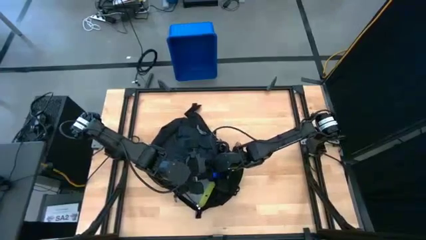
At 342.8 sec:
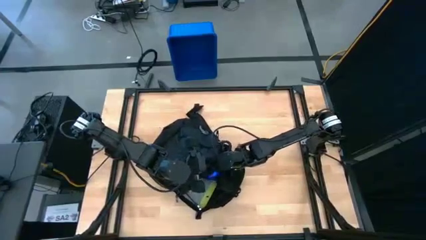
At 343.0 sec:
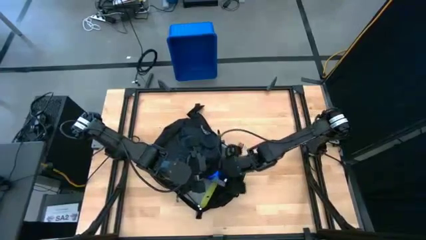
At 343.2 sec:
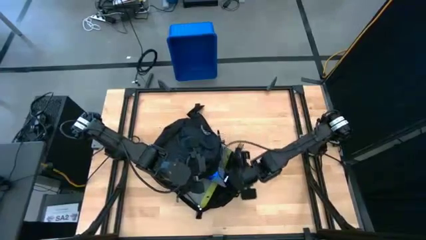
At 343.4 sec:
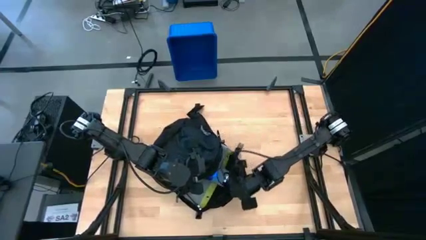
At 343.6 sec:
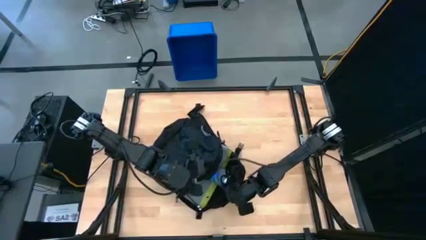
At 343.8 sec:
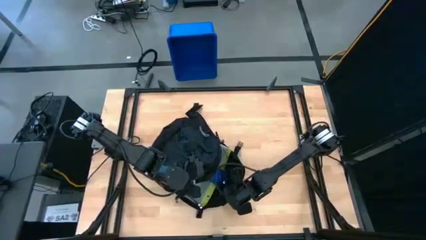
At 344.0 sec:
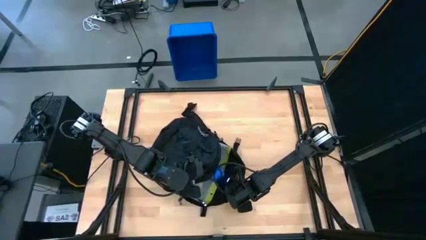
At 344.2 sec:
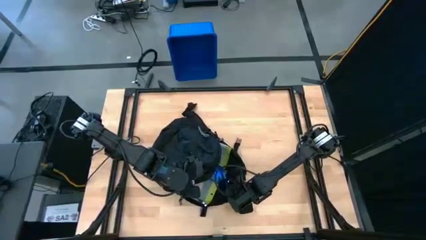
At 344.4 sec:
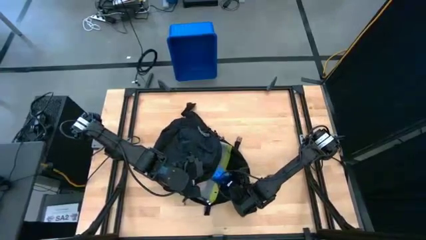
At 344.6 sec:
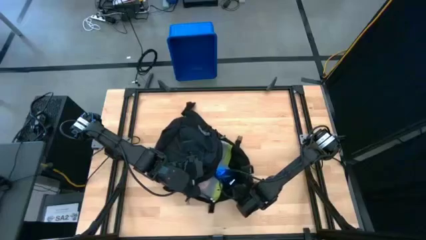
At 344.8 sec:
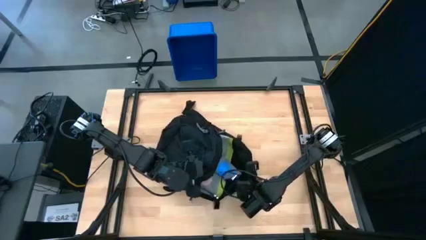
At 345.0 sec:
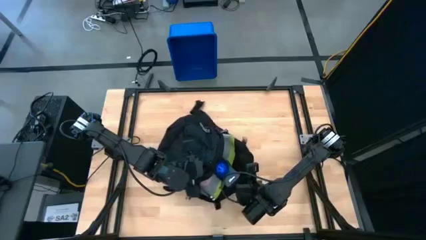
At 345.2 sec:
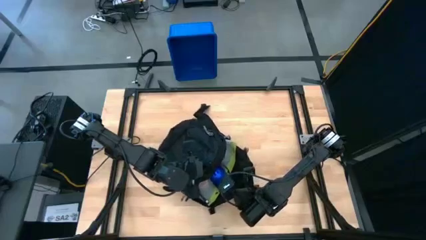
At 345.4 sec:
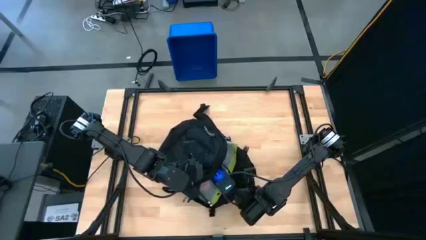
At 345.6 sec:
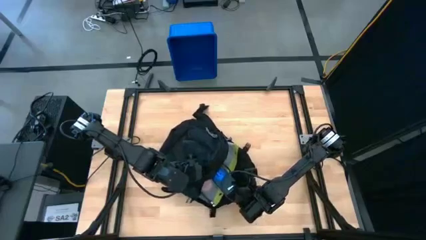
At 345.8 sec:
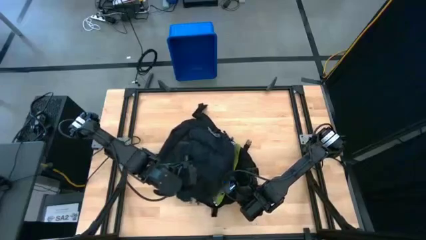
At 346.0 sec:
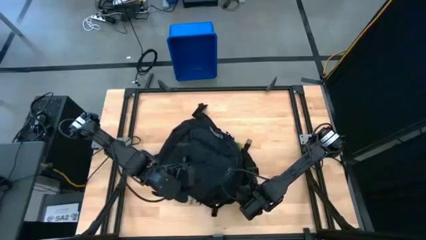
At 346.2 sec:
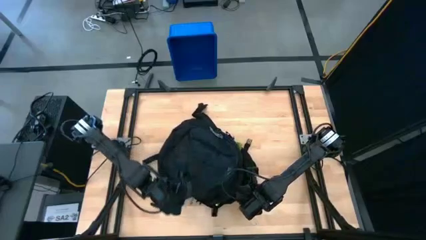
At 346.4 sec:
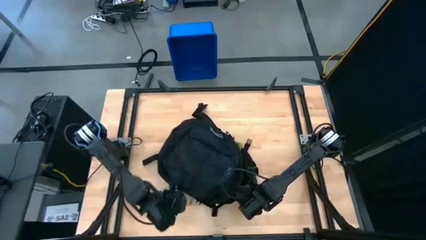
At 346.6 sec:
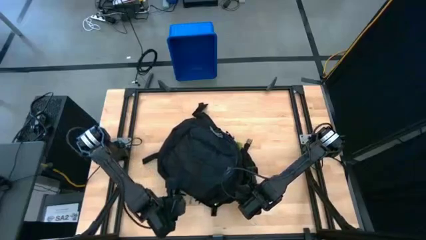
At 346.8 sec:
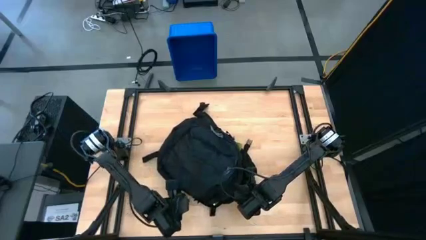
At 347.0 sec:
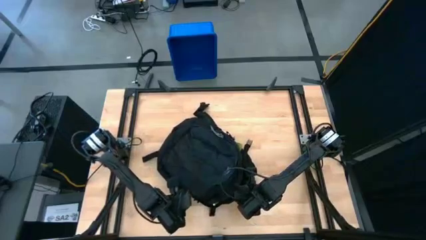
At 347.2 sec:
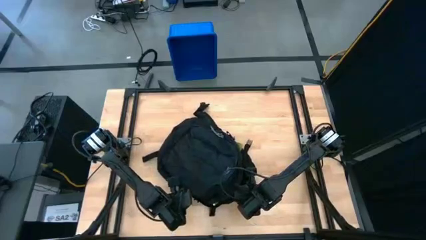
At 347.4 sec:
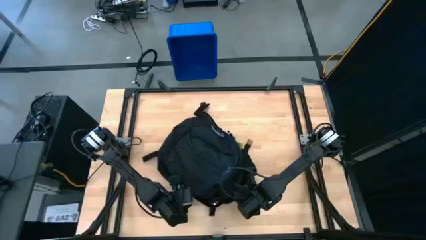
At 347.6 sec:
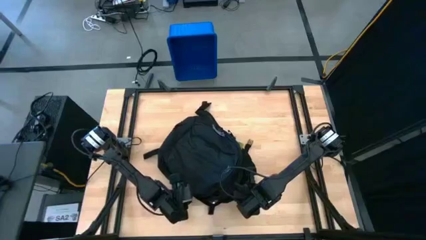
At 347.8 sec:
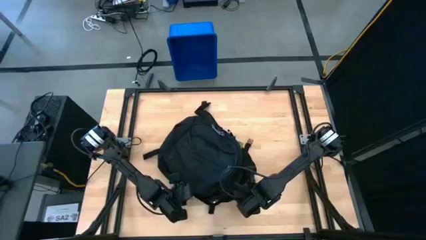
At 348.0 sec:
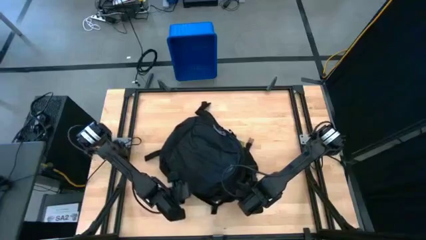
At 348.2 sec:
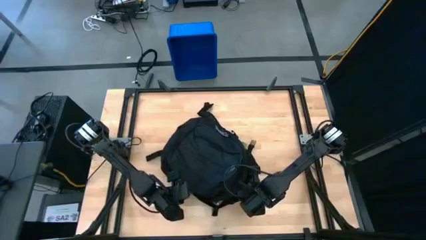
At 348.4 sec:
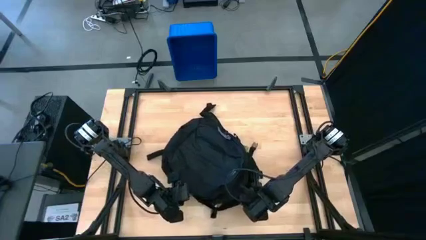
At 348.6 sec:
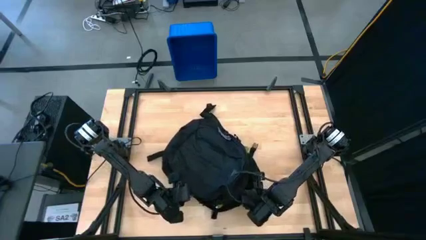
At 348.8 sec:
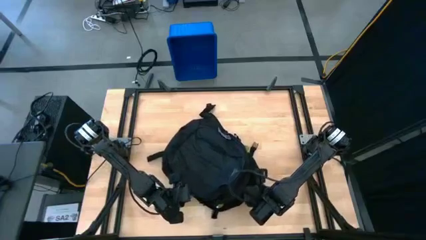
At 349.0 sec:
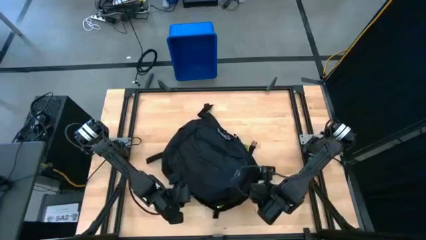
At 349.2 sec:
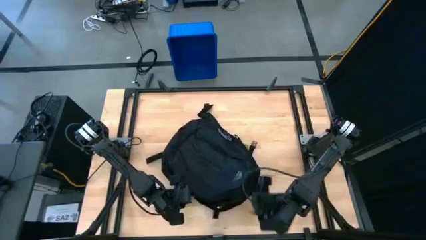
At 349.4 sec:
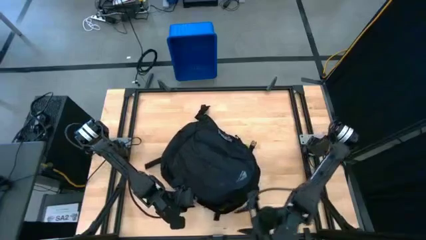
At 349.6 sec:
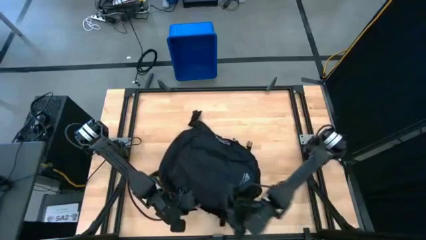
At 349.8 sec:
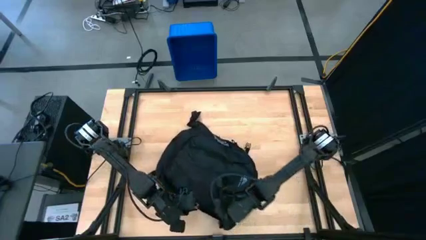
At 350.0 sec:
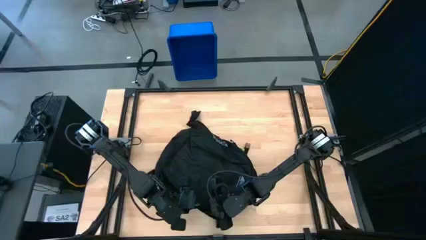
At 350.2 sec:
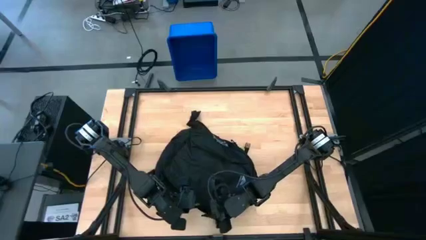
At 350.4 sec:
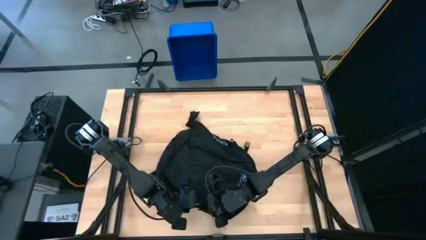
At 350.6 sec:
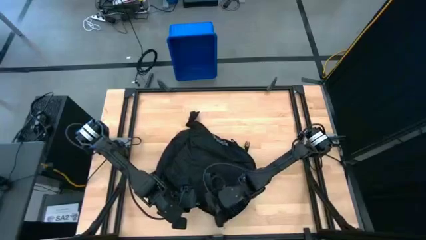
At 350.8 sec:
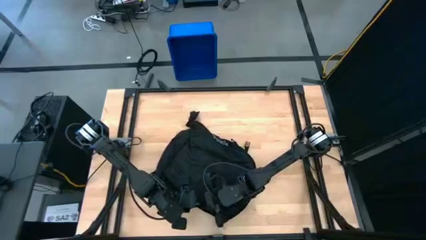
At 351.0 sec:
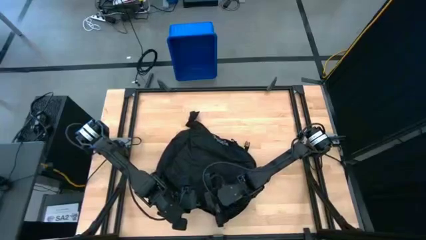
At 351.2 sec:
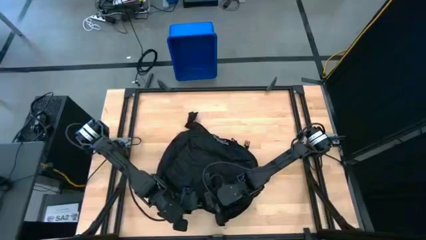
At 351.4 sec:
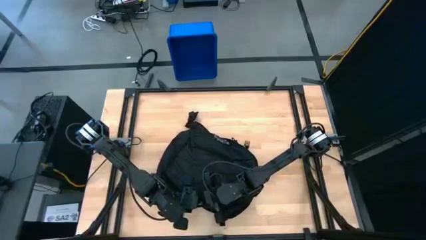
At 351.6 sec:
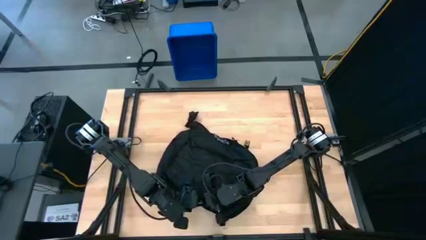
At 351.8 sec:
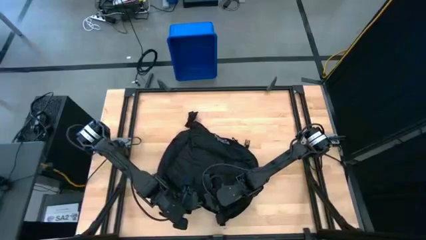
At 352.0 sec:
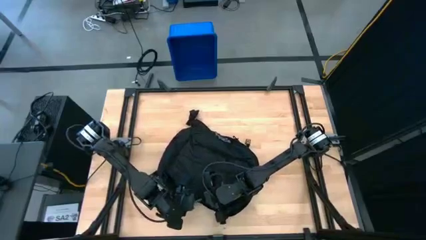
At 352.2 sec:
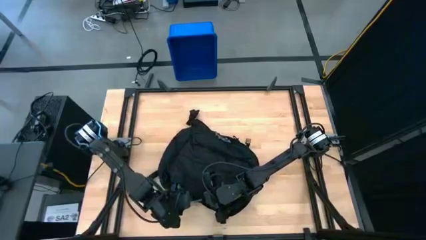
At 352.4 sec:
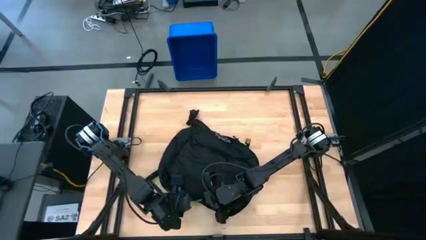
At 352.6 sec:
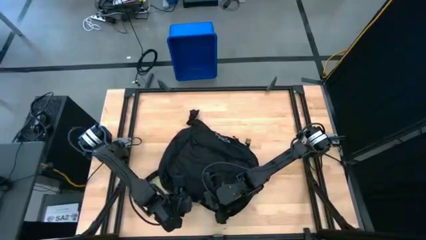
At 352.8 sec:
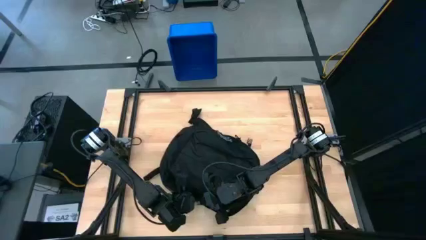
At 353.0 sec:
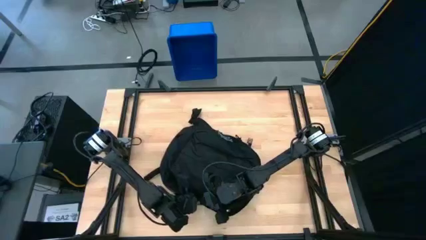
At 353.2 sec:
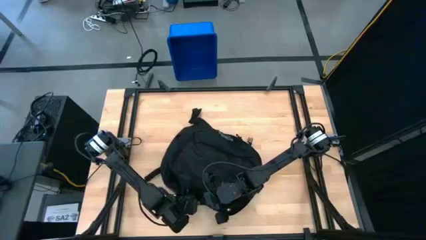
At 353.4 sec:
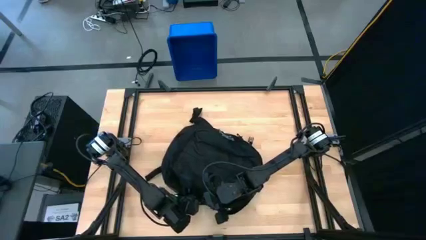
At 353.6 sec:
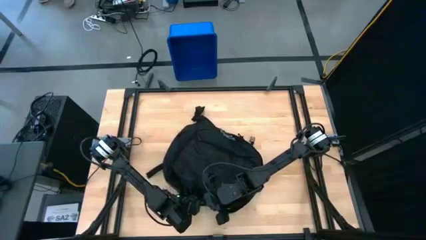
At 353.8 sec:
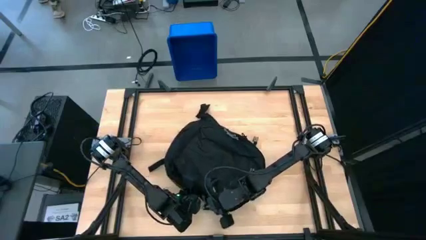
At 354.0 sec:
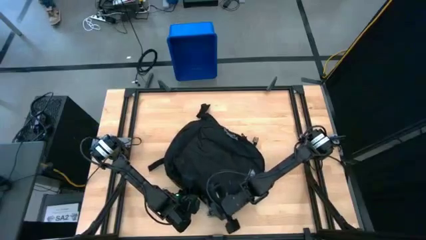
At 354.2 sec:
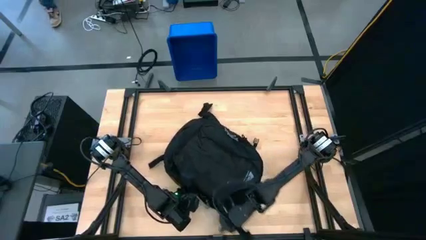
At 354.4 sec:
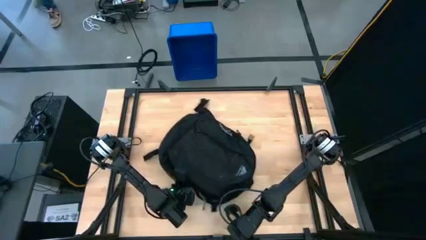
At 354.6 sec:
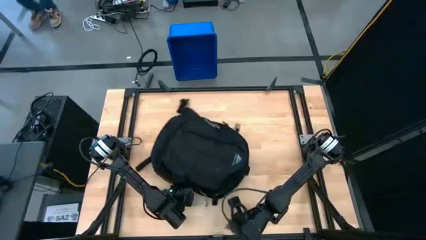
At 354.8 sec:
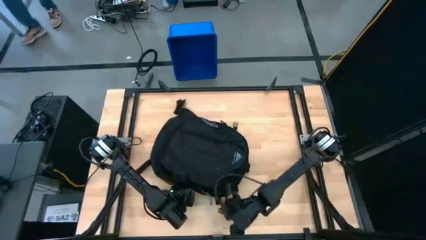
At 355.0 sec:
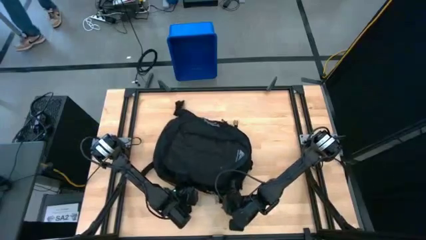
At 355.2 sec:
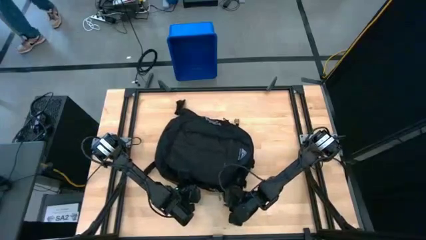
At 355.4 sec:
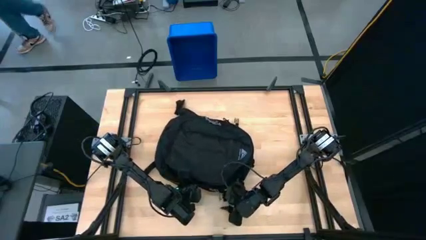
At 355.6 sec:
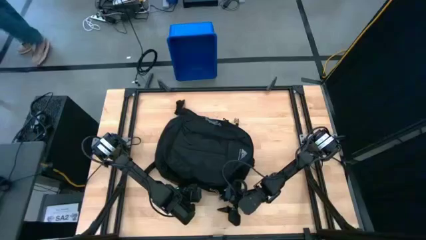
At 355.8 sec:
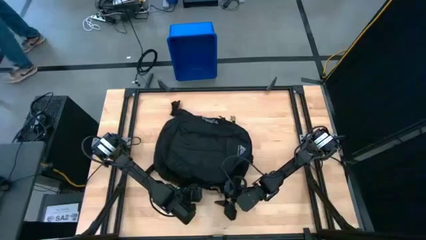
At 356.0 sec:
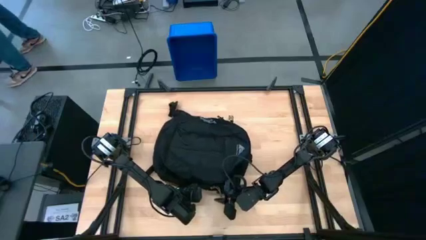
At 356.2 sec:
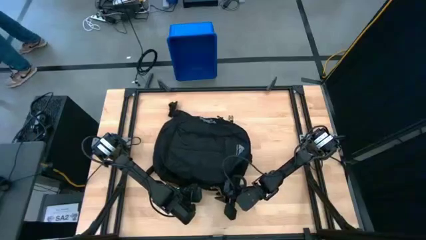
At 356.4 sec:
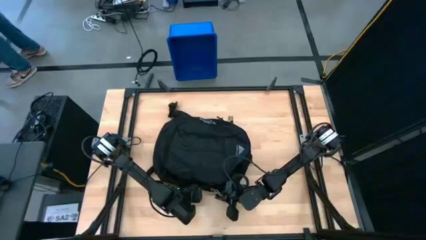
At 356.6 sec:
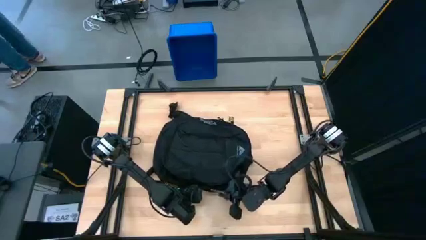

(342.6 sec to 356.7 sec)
Task: Unpack backpack
Close the backpack

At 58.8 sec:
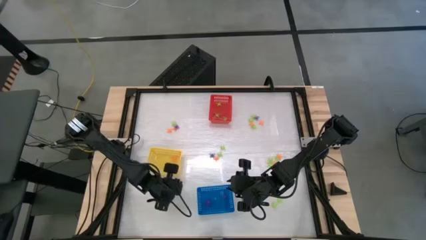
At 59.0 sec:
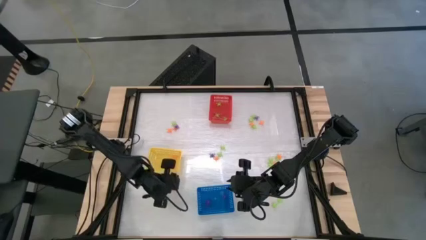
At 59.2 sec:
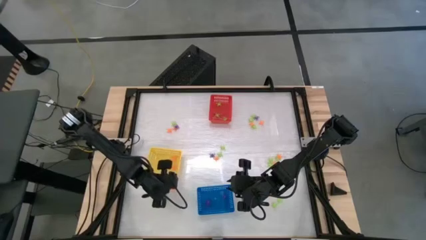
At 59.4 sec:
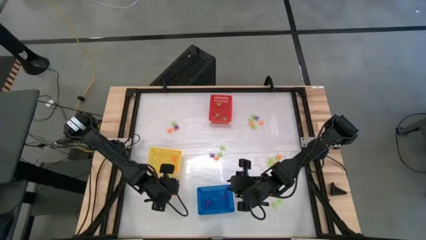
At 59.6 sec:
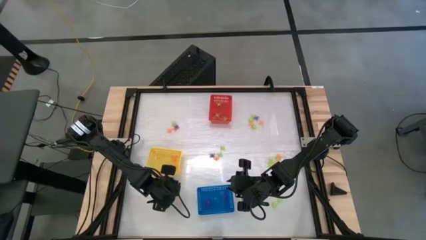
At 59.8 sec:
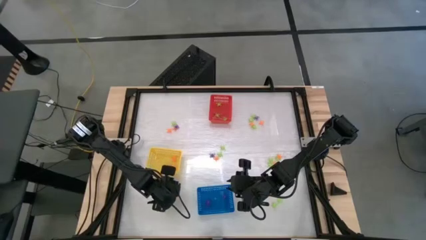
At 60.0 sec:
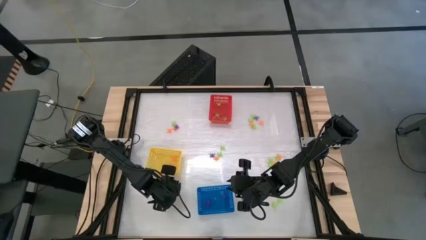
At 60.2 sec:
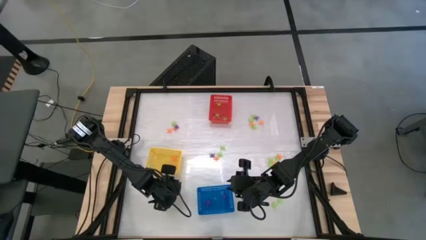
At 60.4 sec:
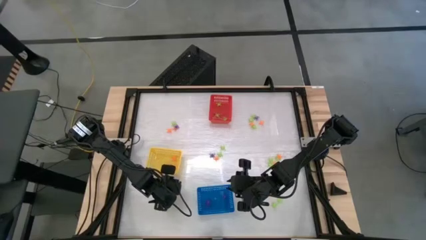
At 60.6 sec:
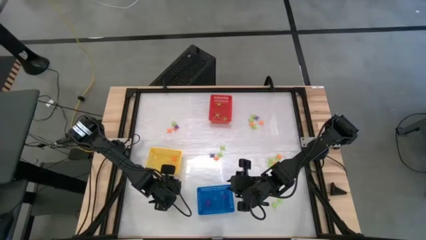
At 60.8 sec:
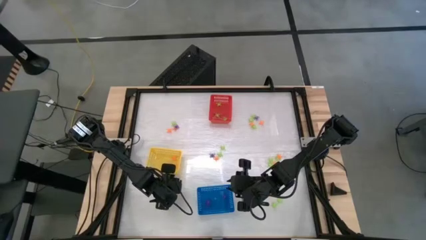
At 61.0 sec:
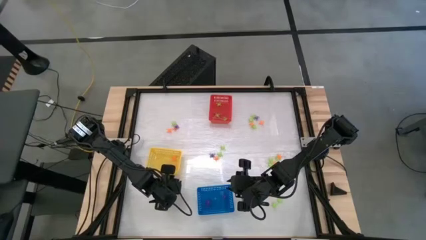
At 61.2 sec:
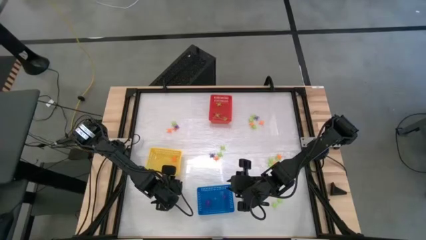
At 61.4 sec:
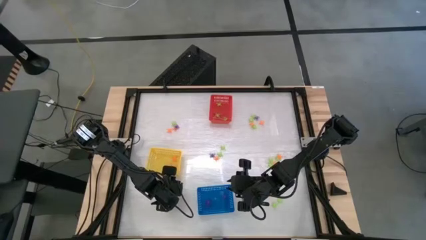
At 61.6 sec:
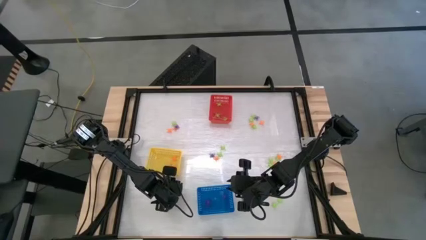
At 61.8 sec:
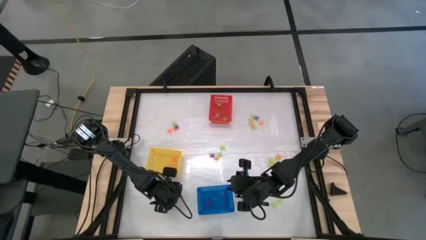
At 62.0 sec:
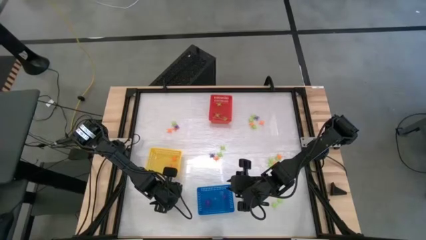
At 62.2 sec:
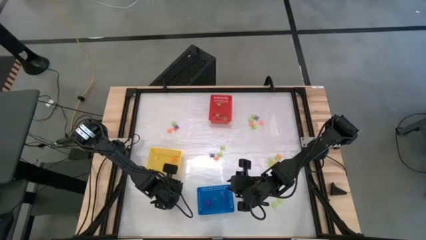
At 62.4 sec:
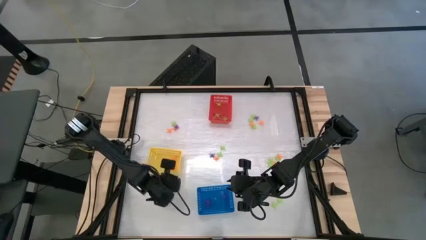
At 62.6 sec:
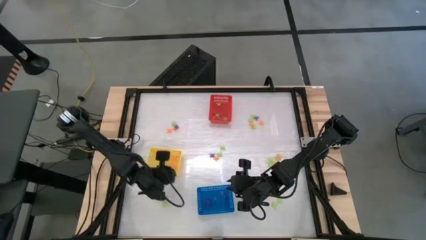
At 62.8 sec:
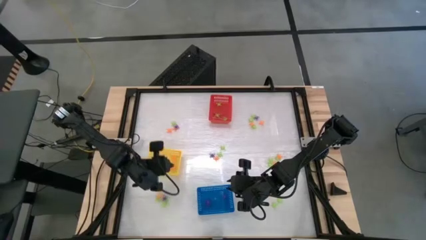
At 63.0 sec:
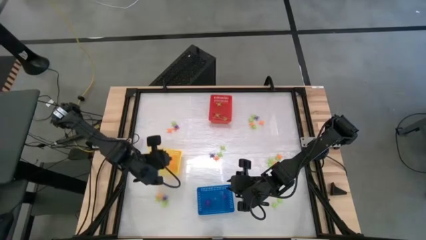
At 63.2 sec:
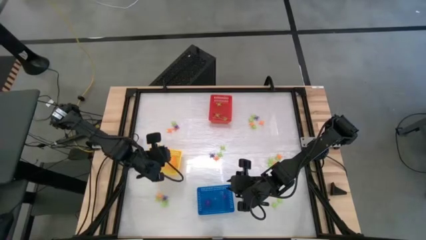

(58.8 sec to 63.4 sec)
Task: Sort Halloween decoration
Put the orange spider toy into the yellow basket
